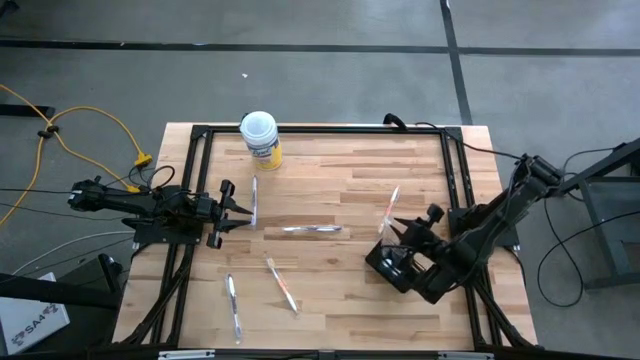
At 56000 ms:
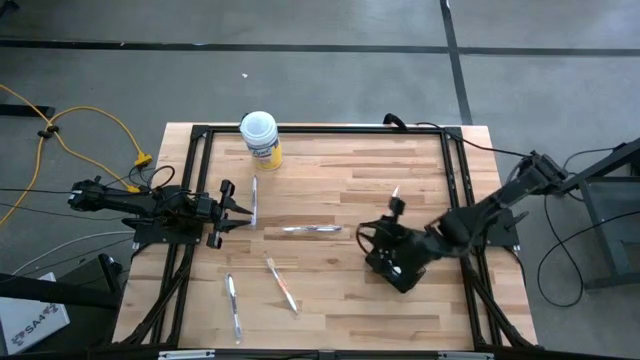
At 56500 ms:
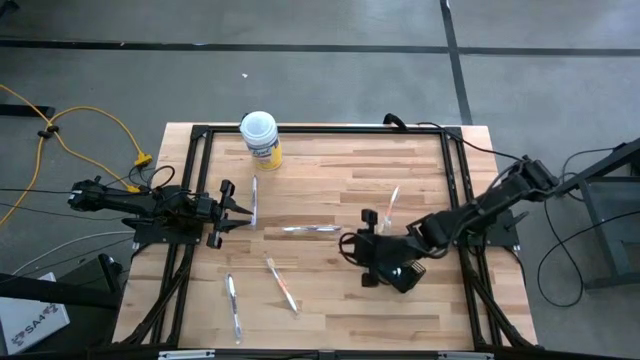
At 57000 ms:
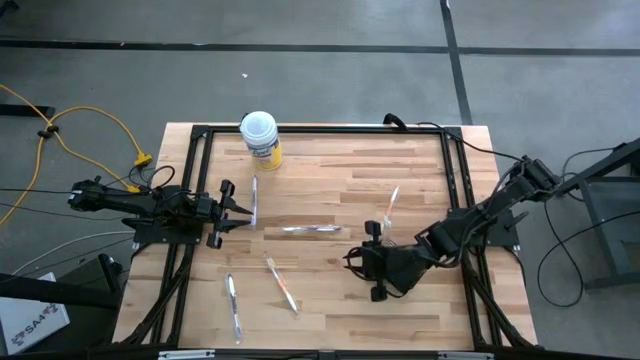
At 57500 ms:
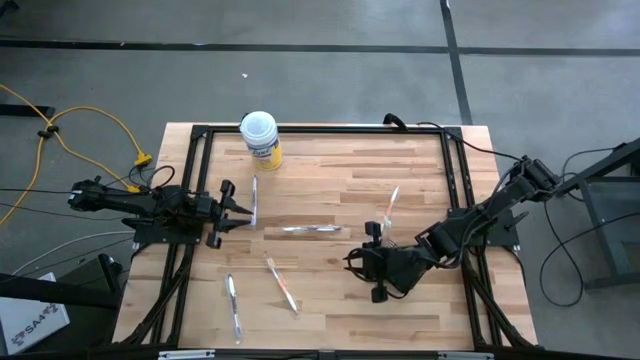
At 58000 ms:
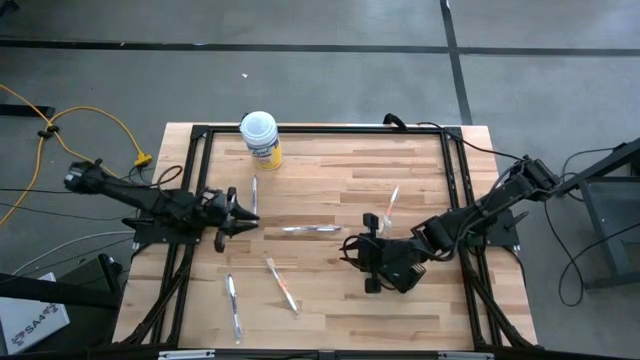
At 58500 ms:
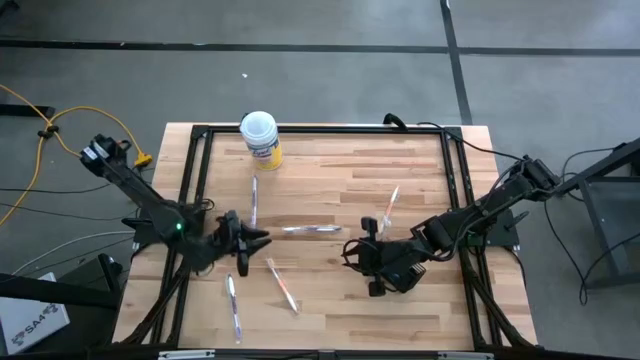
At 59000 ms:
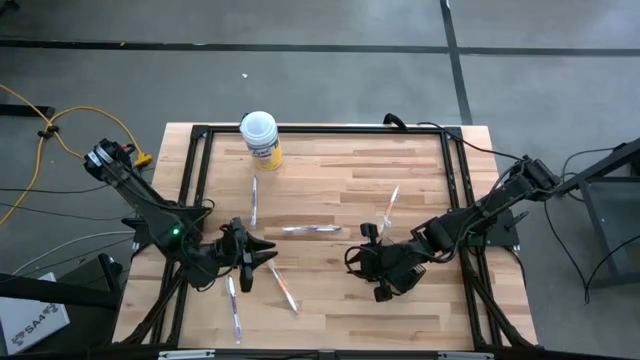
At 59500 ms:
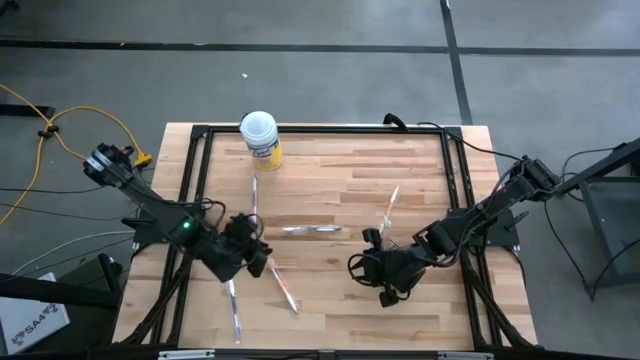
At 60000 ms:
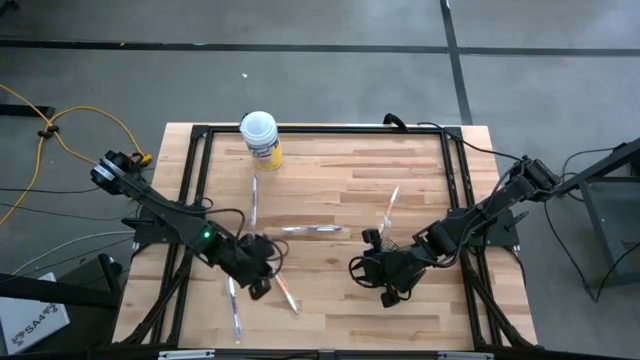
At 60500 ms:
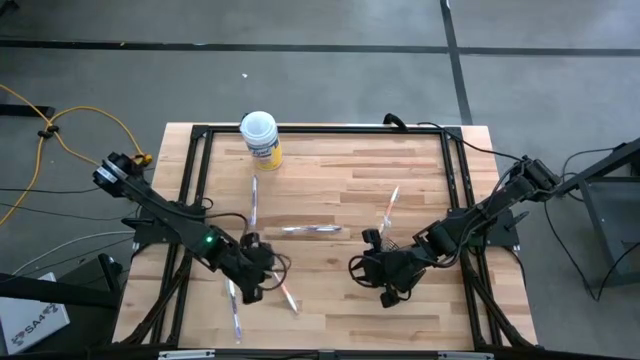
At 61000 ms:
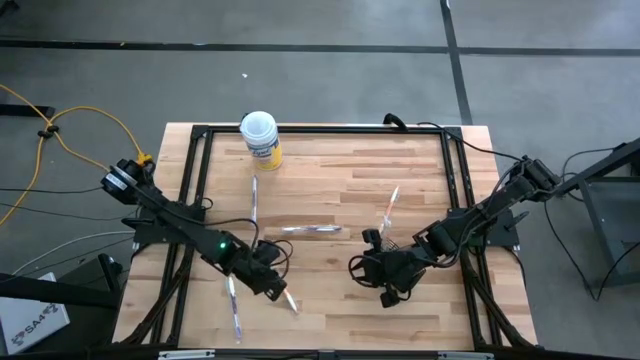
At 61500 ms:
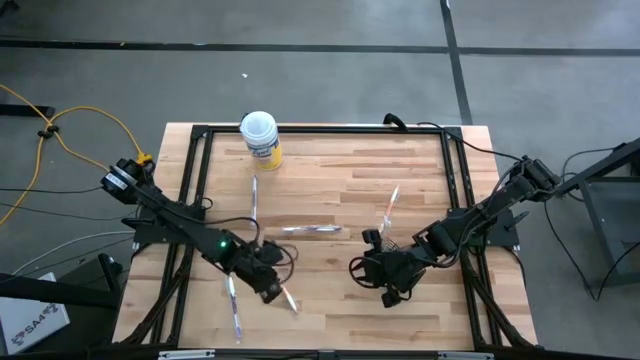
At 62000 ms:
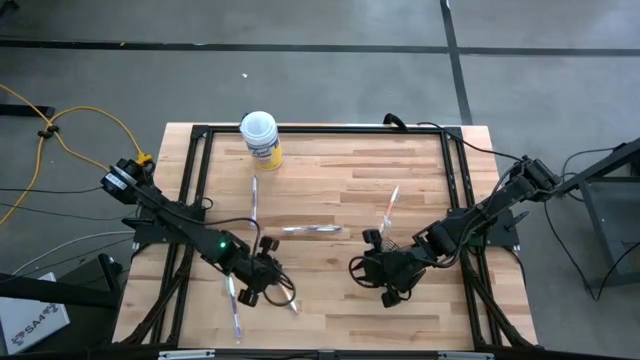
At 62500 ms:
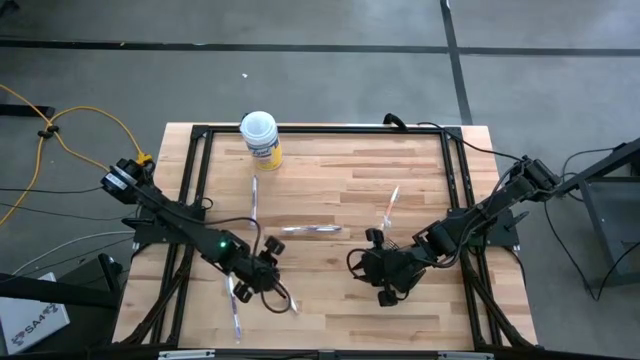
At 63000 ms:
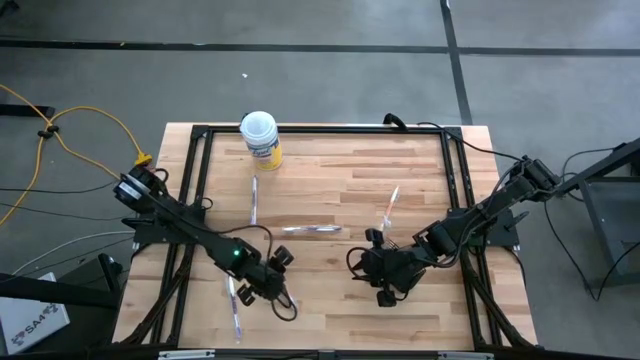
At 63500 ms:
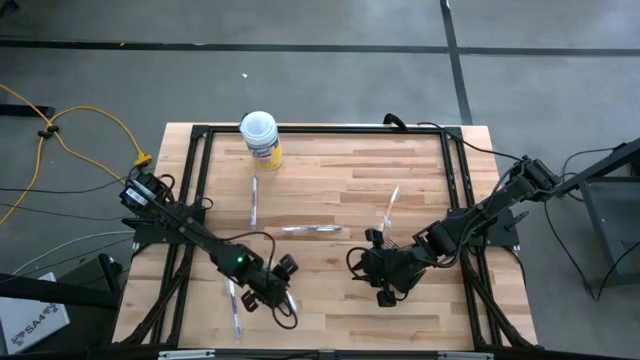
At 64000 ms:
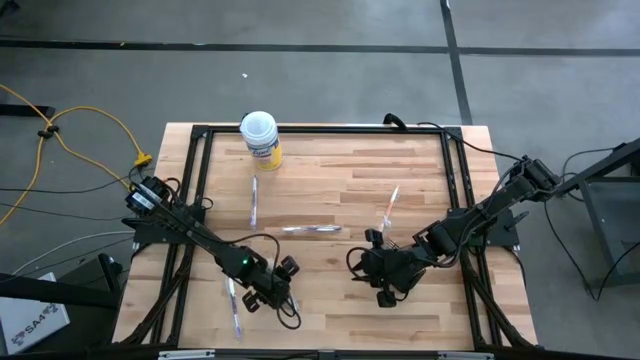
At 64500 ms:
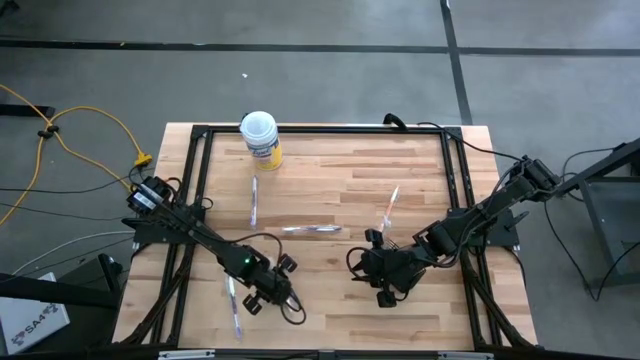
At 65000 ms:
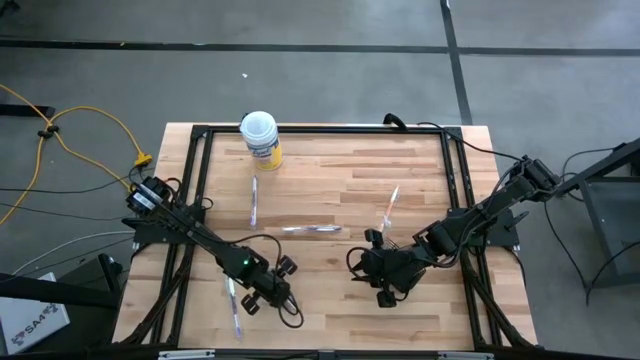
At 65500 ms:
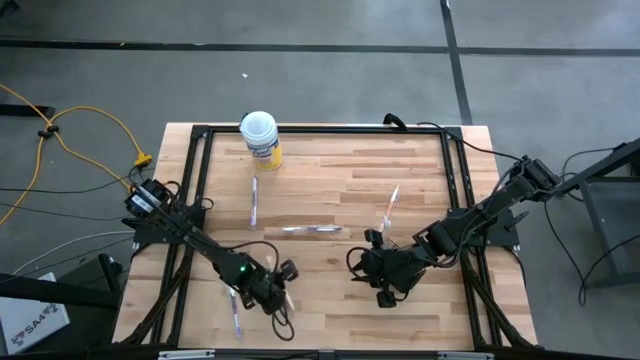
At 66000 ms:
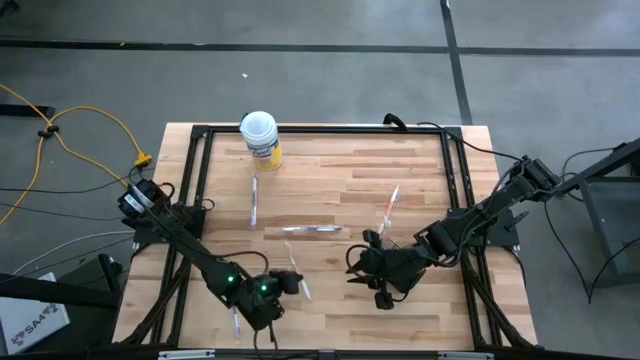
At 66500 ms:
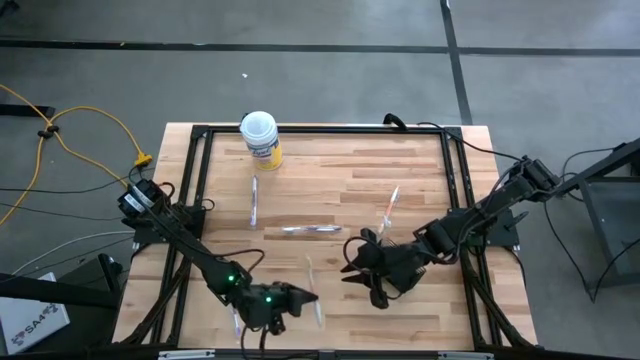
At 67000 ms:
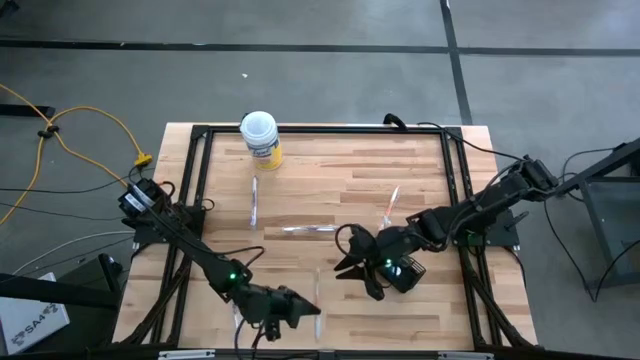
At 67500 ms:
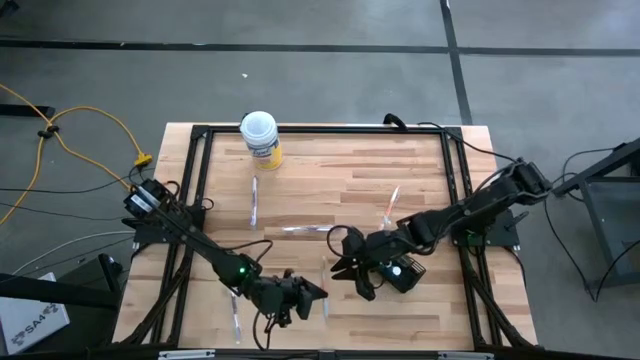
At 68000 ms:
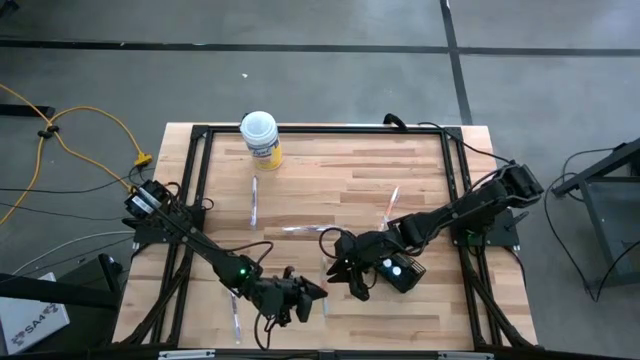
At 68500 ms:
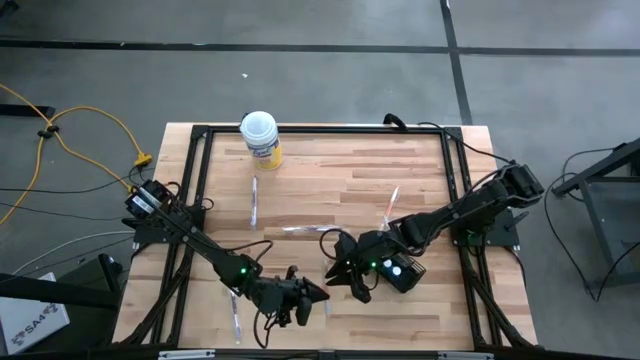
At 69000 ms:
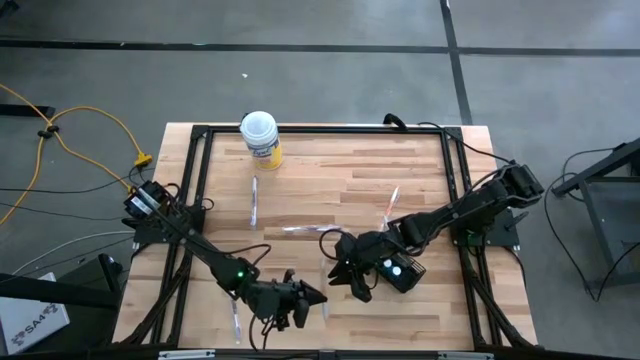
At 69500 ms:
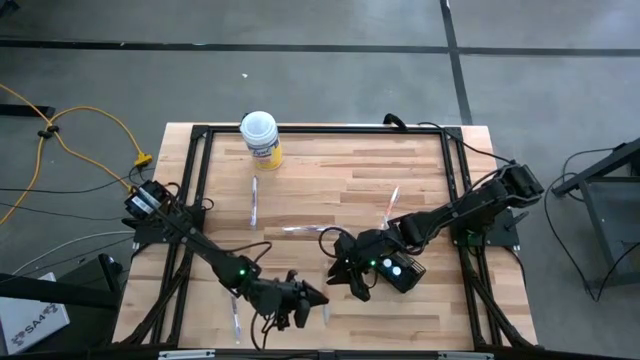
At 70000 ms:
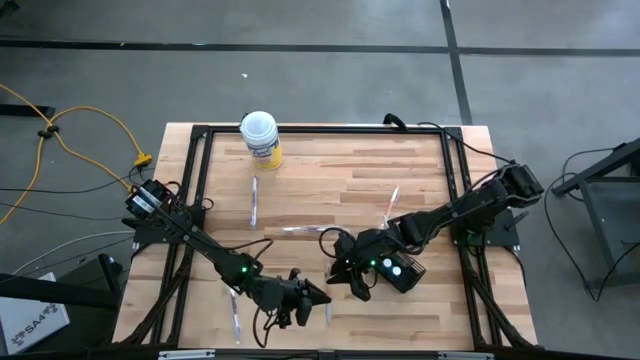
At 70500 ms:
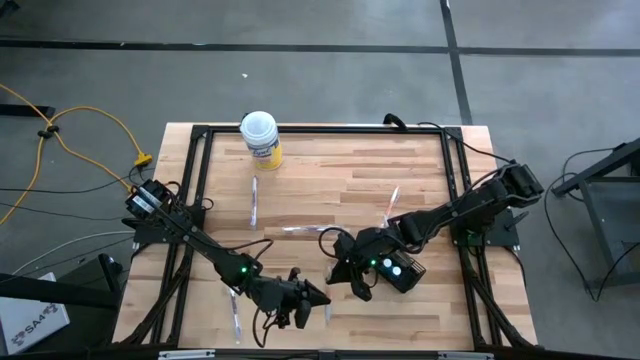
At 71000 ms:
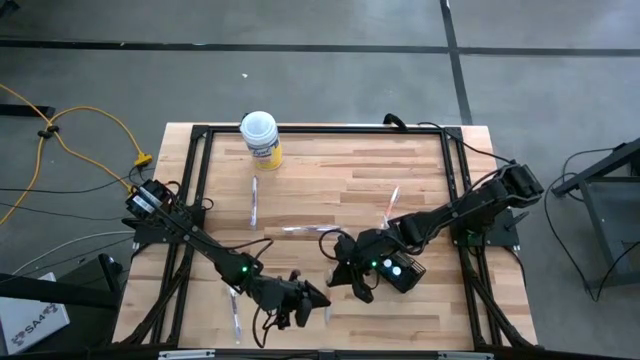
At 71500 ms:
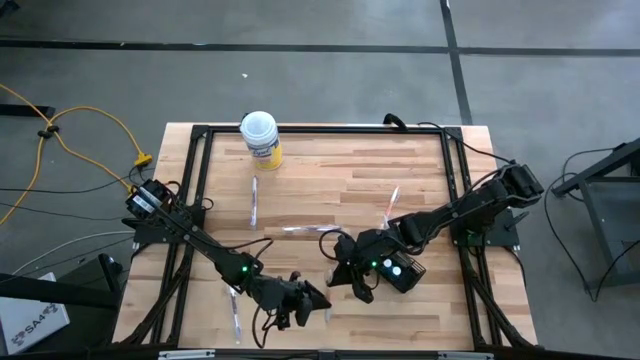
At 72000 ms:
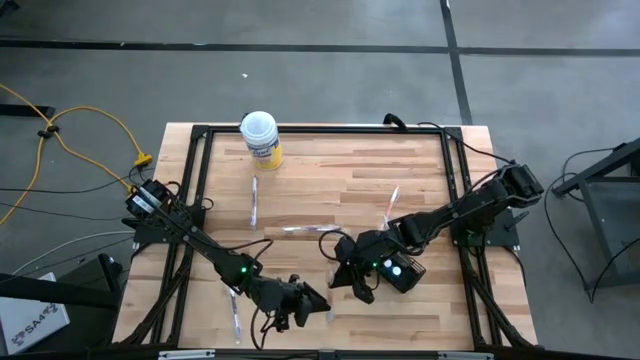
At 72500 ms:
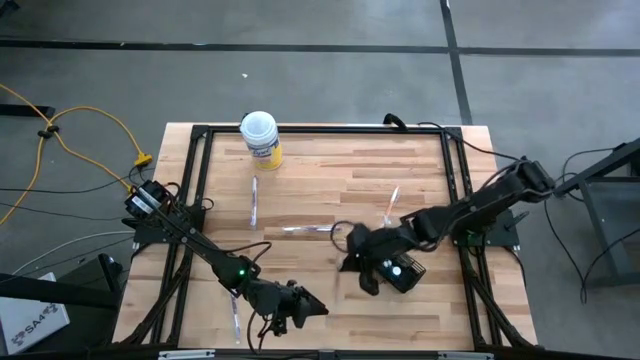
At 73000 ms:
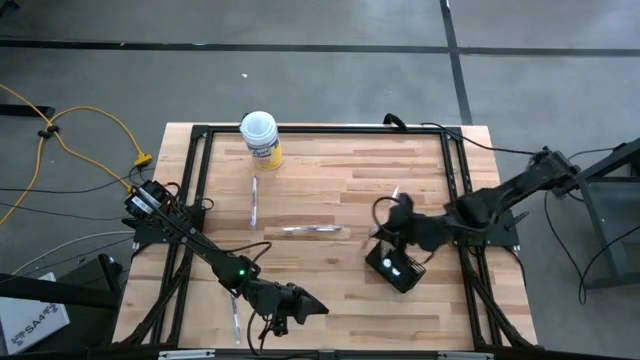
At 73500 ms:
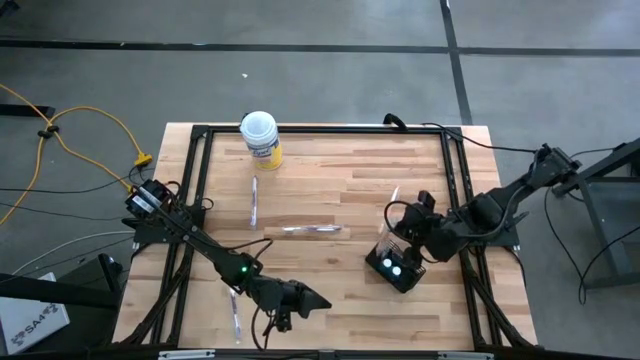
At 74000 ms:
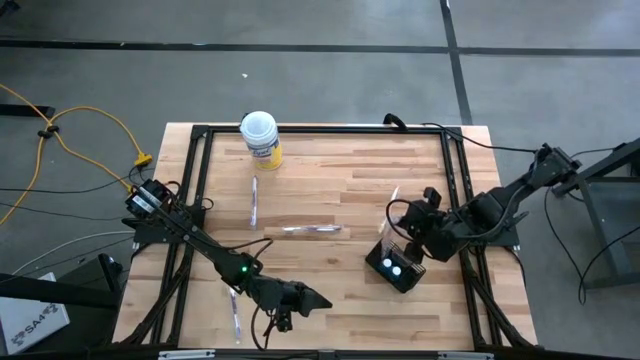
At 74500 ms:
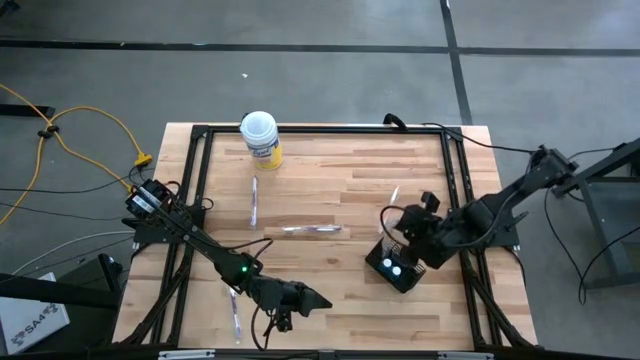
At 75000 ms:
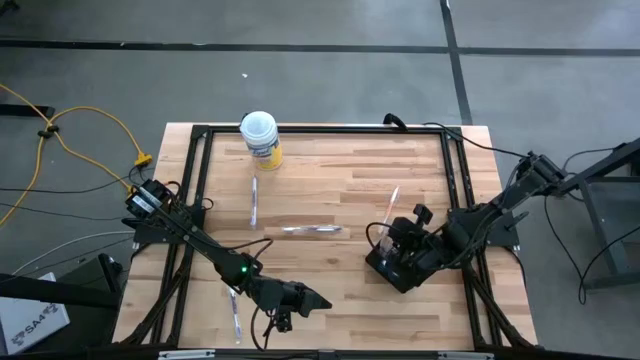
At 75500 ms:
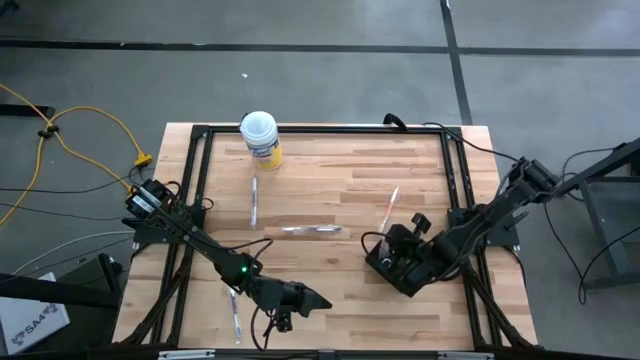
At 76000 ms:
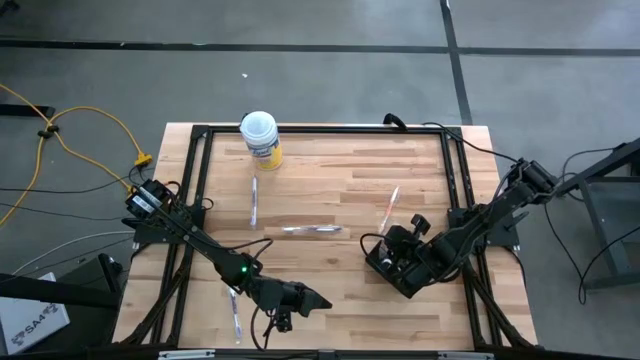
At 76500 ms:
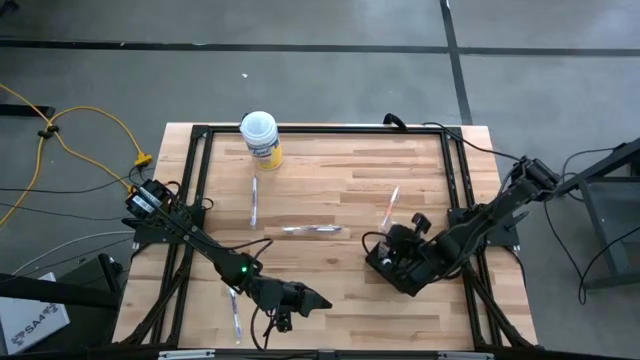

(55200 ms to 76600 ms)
Task: Pick & Place toothbrushing station
Put the left orange toothbrush into the wire organizer
